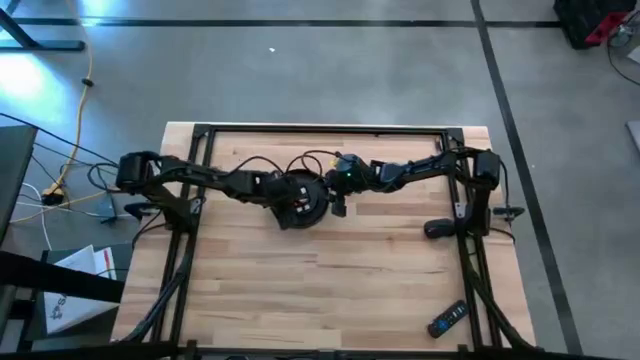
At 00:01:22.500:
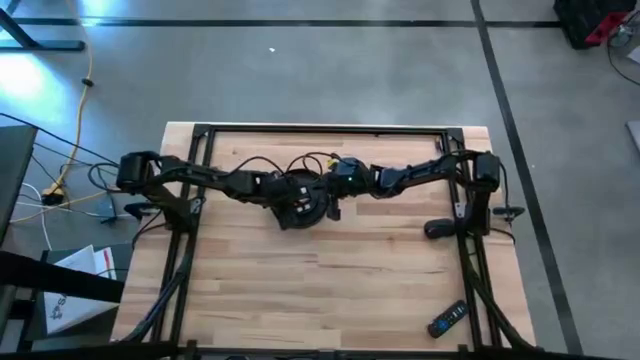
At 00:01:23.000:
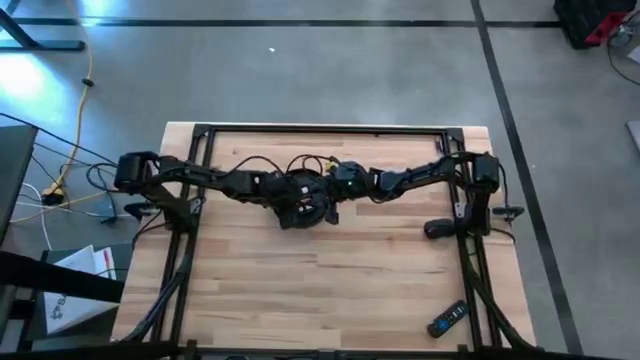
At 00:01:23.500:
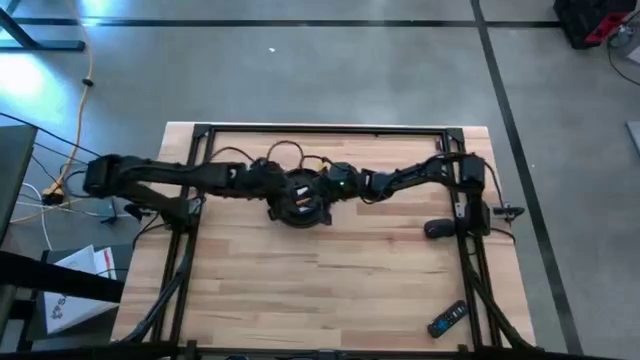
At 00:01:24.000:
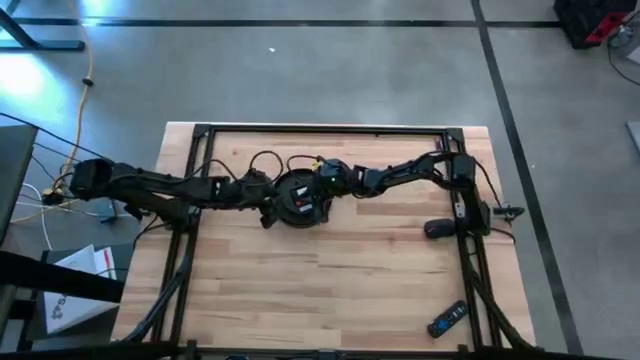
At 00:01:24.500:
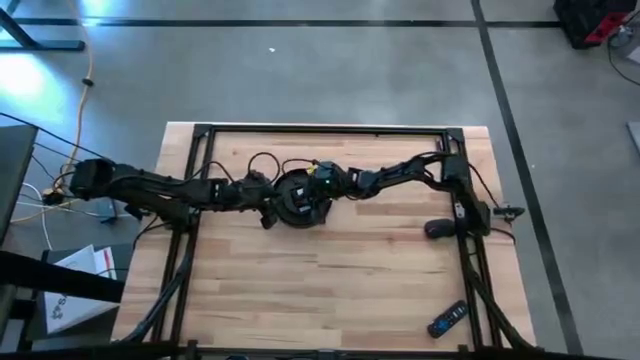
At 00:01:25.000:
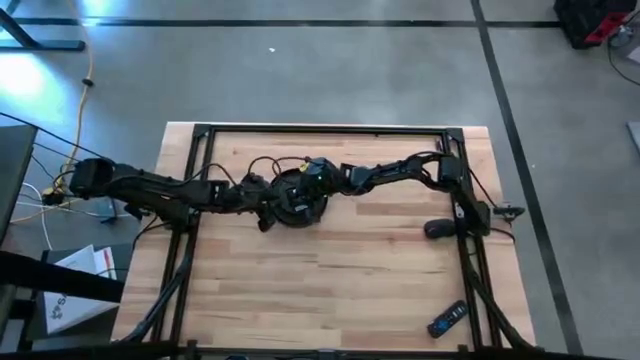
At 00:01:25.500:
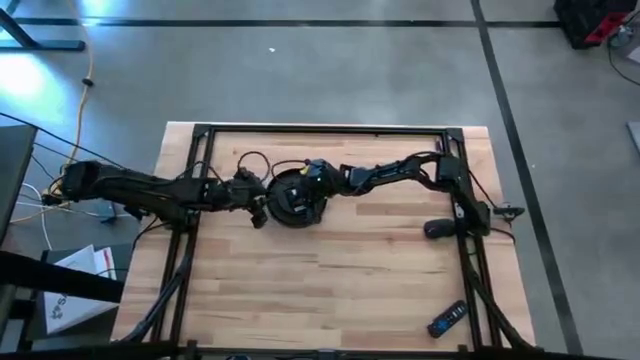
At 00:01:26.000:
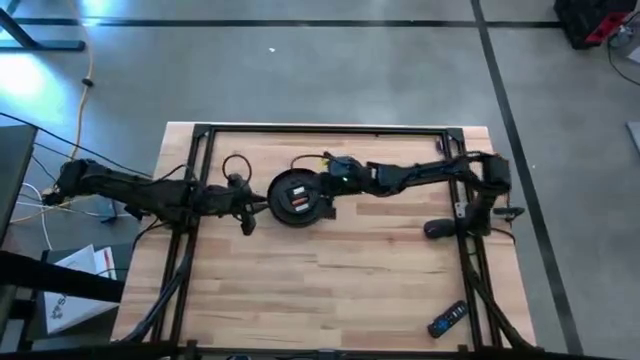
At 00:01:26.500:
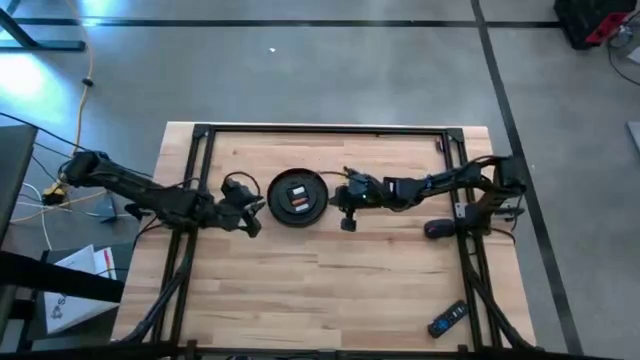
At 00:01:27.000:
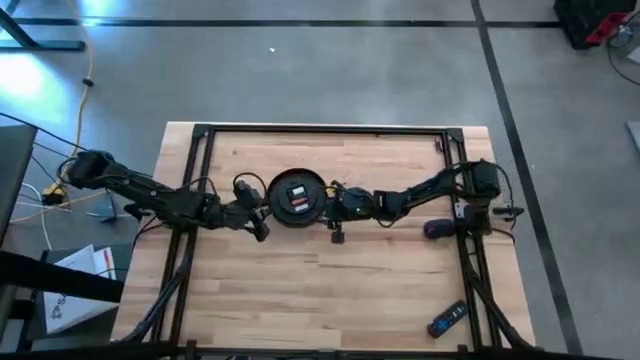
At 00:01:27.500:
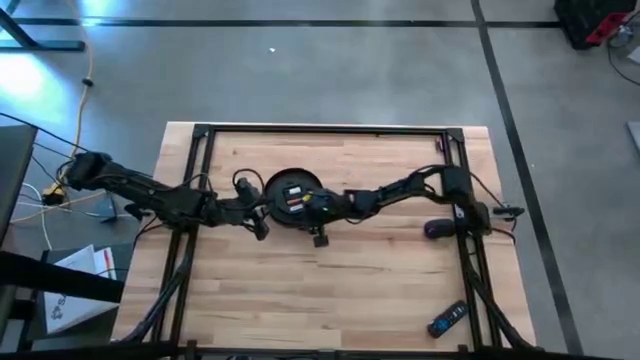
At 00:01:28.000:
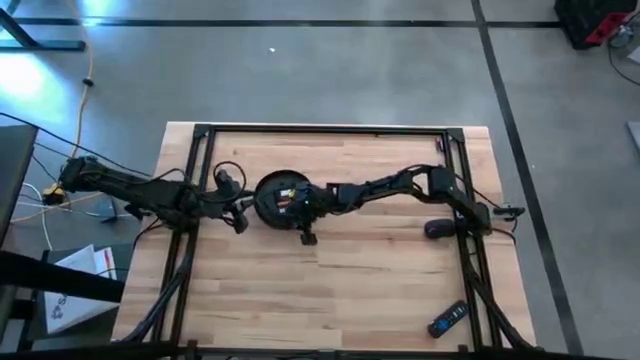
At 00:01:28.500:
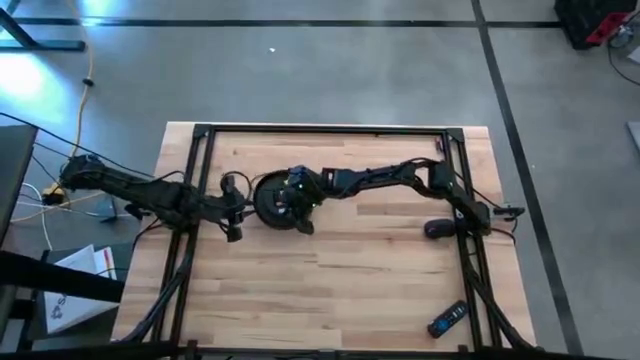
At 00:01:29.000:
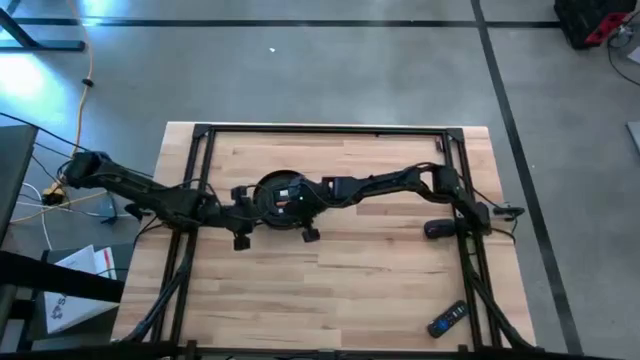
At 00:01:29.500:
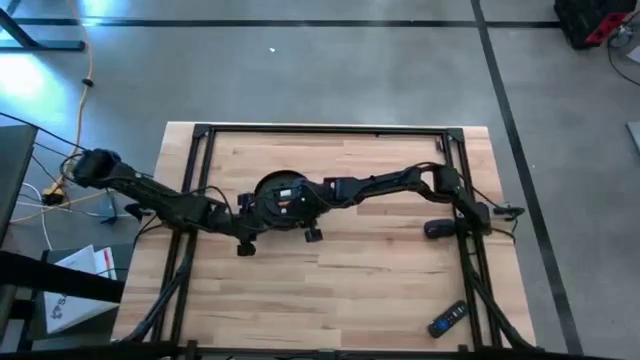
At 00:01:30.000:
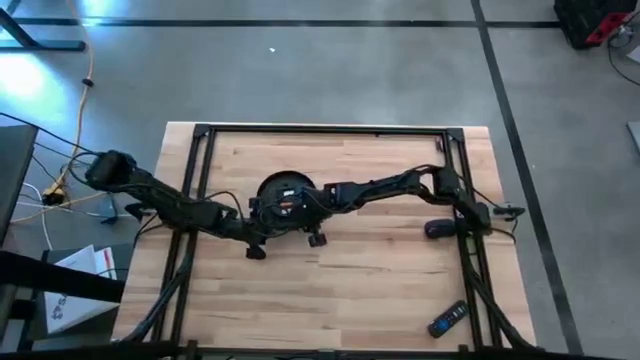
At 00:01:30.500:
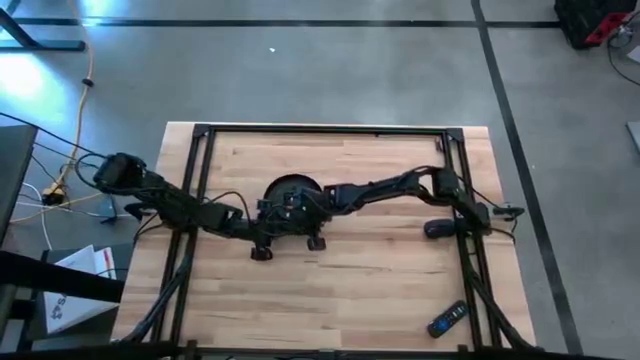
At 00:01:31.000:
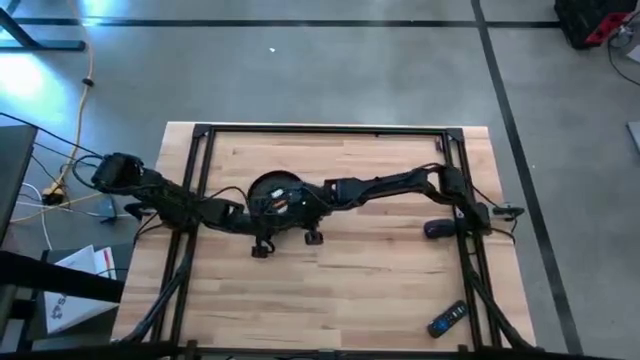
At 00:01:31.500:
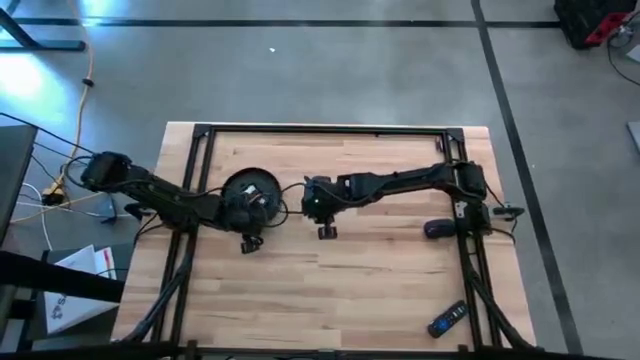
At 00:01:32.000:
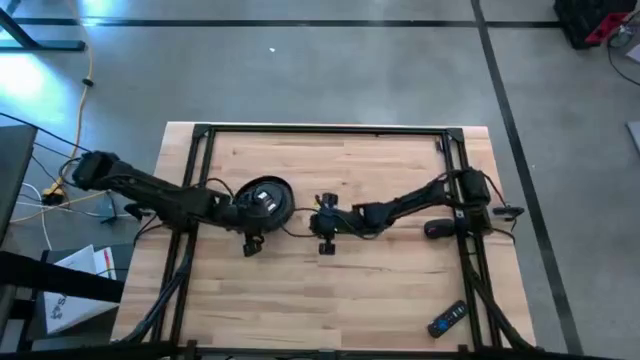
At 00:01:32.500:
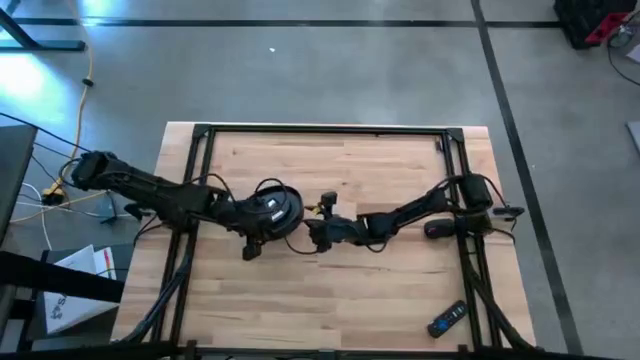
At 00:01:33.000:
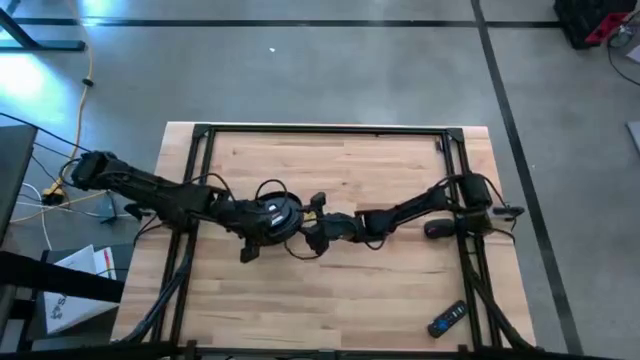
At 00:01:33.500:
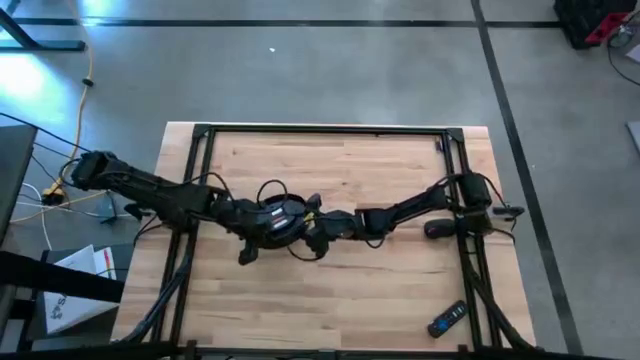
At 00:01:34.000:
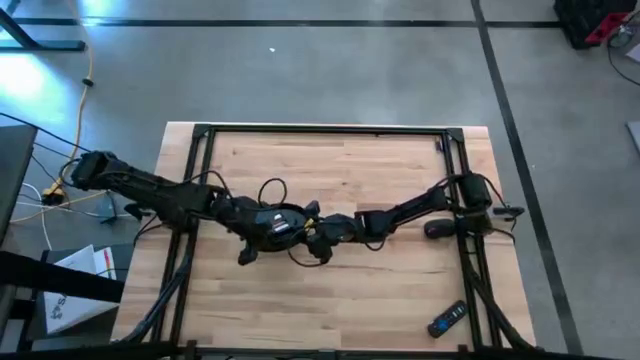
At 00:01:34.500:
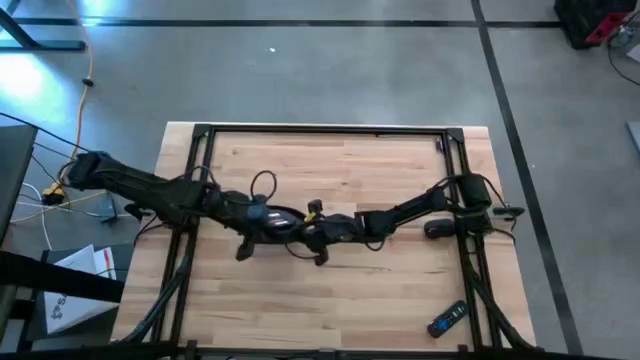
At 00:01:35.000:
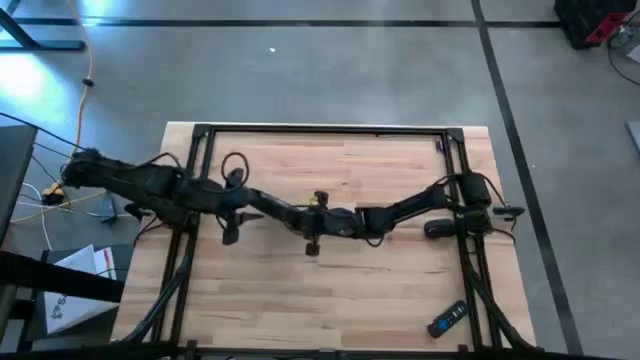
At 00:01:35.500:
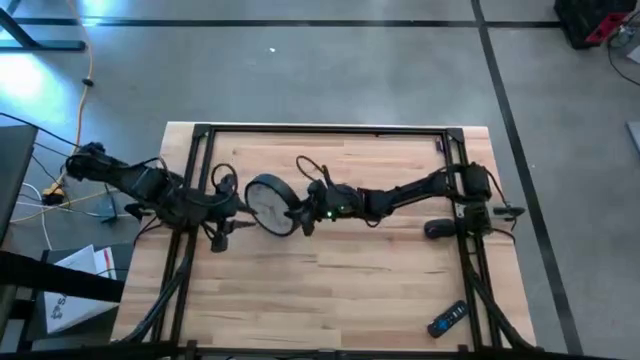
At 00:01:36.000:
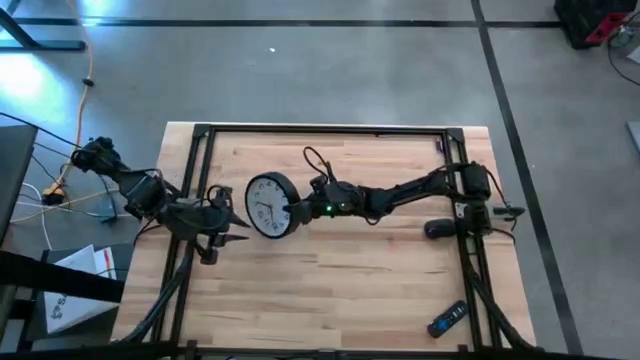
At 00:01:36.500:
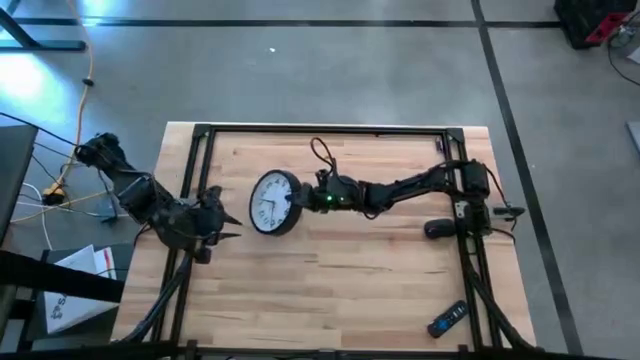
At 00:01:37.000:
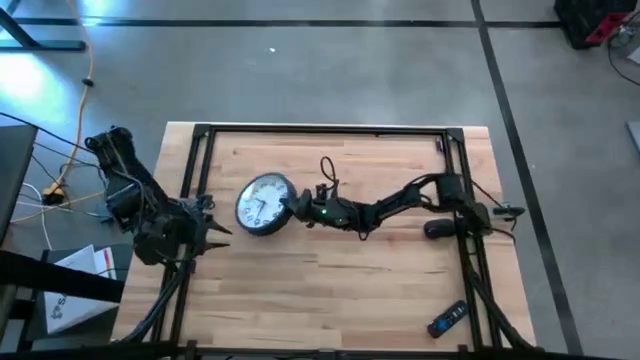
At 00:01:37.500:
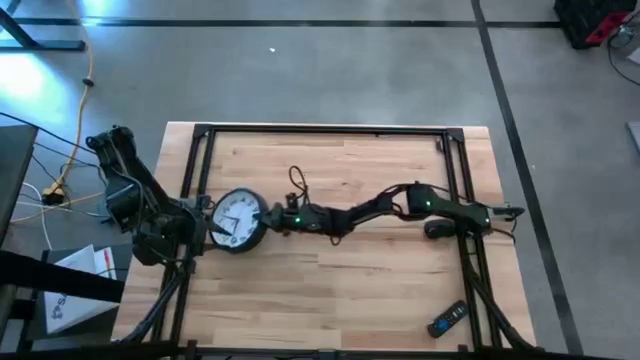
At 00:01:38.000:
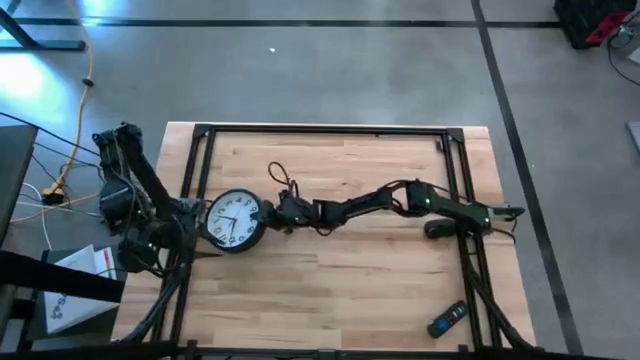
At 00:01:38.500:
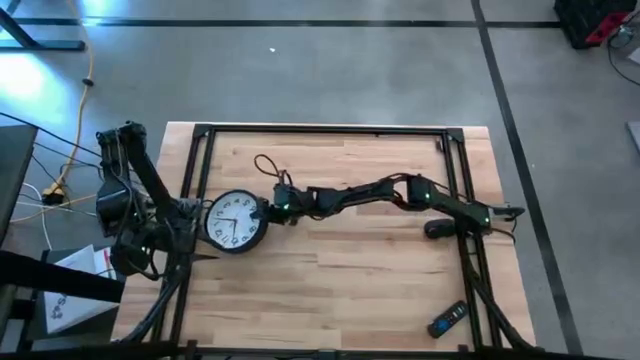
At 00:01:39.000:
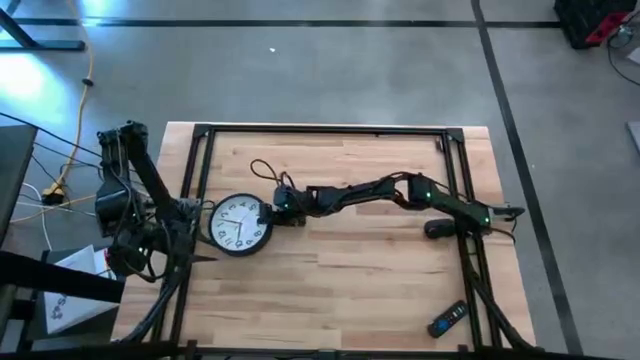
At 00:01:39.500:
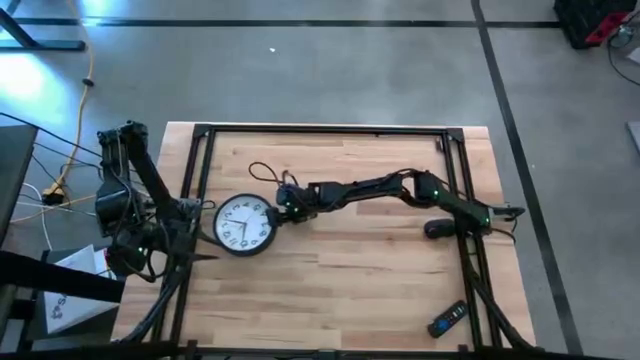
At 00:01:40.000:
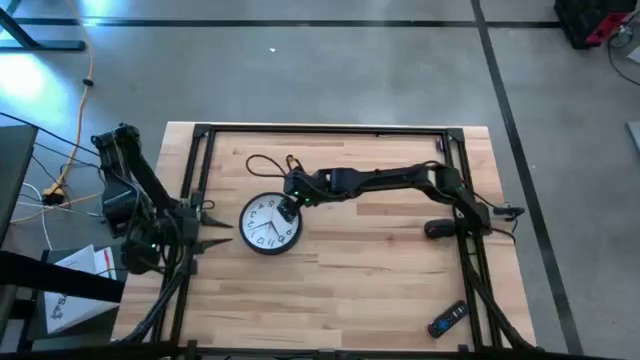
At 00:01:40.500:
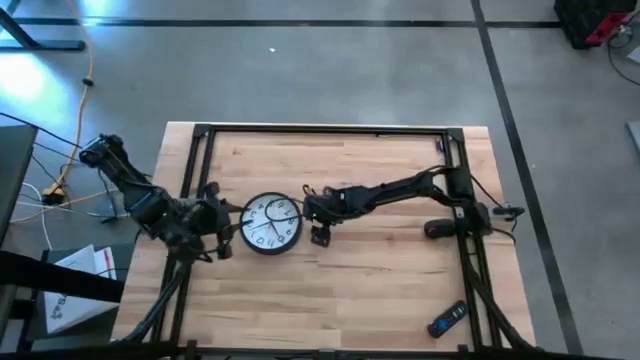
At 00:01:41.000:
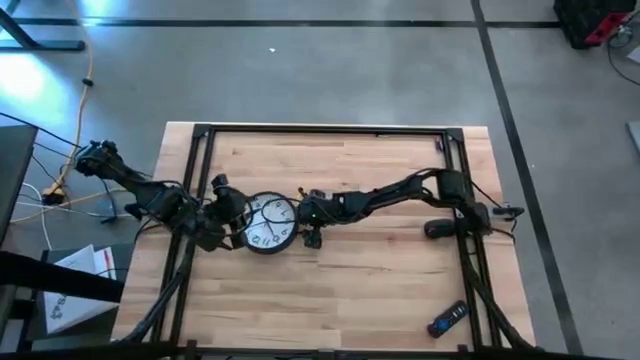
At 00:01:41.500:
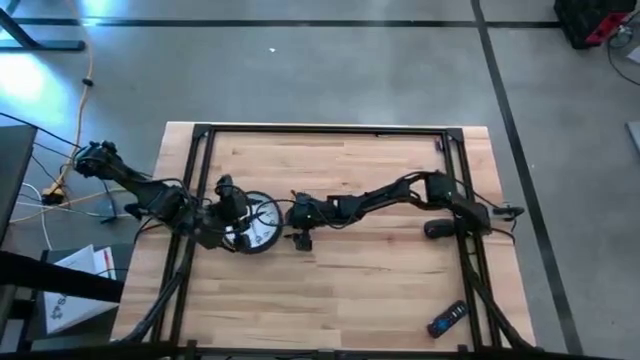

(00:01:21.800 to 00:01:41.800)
Task: Insert battery
Insert the yellow battery into the white-black wall clock

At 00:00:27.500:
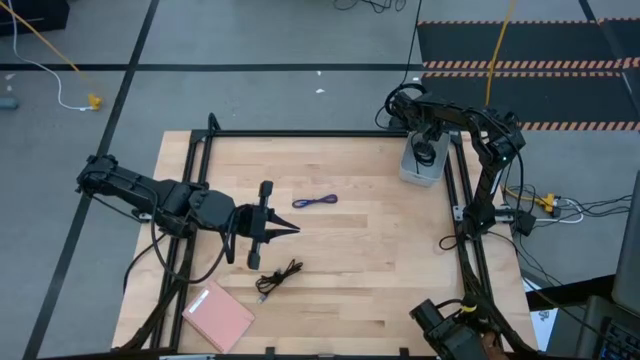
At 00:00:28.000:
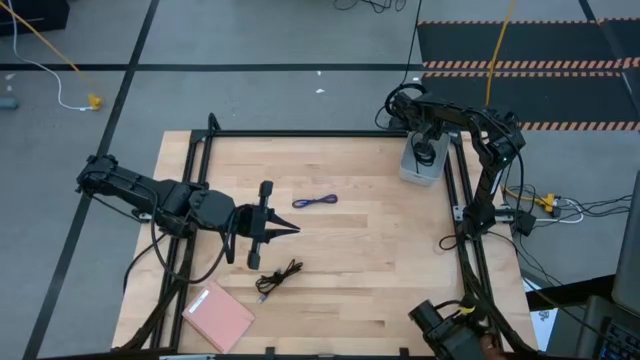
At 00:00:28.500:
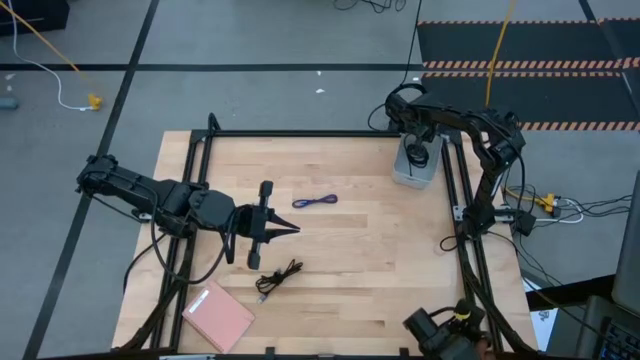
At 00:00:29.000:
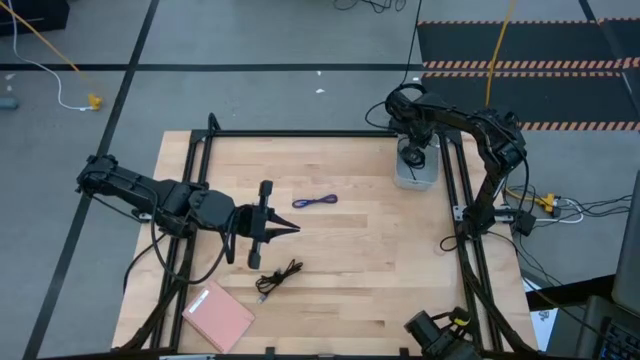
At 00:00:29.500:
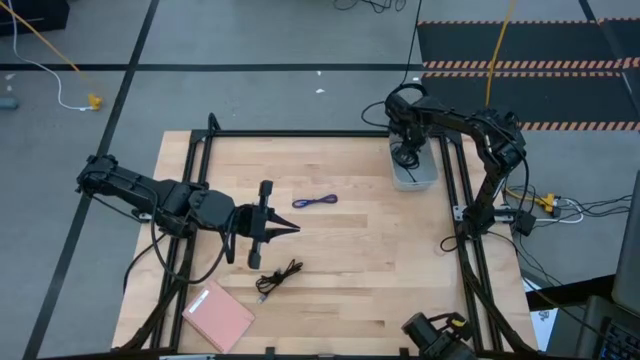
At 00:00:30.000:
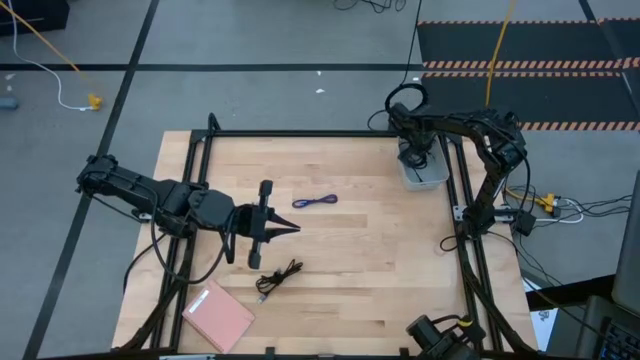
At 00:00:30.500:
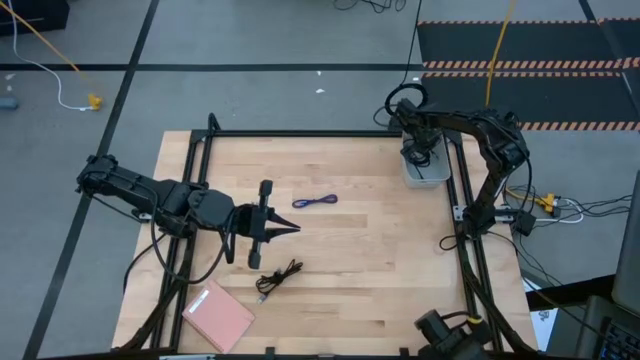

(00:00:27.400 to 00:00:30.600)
Task: Pick and place USB-C Cables
Adjust the black charger cable in the white bin
